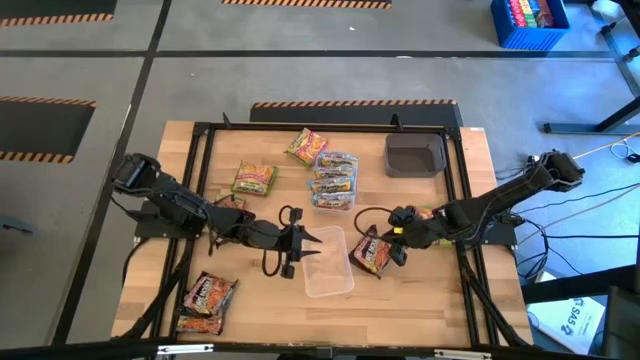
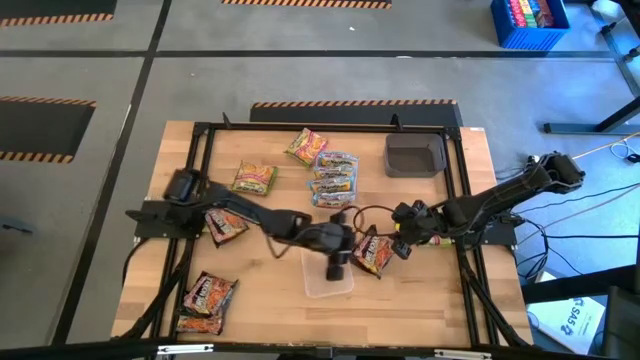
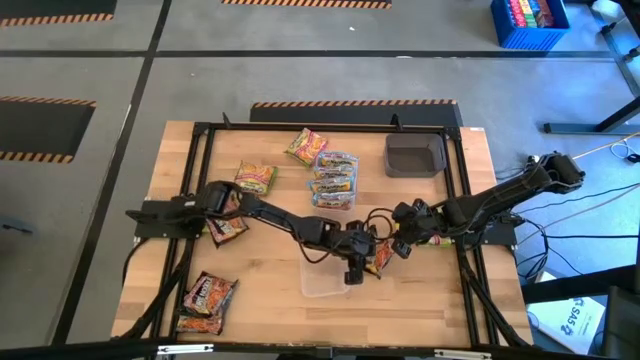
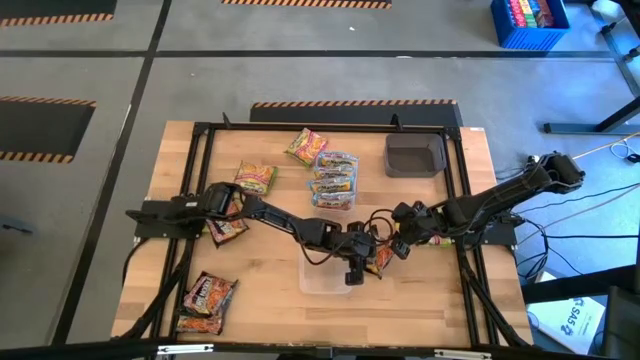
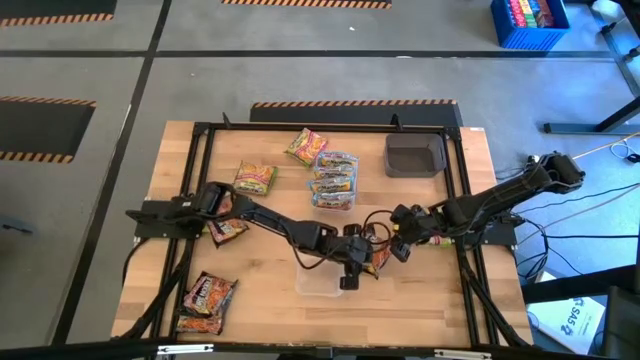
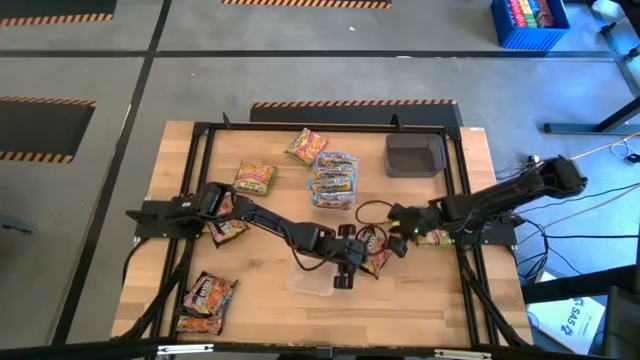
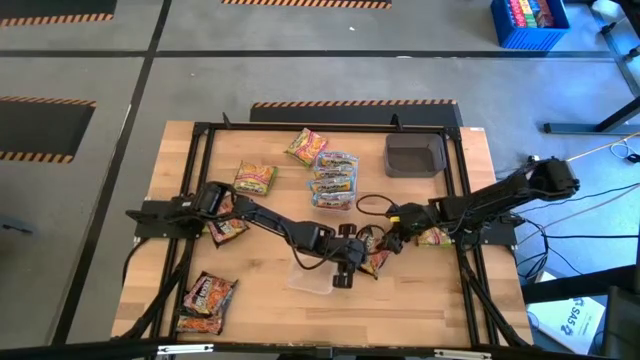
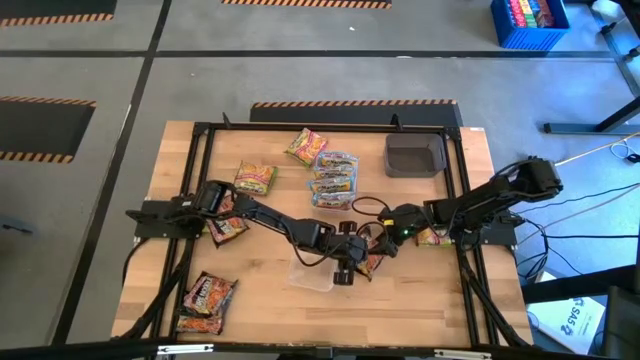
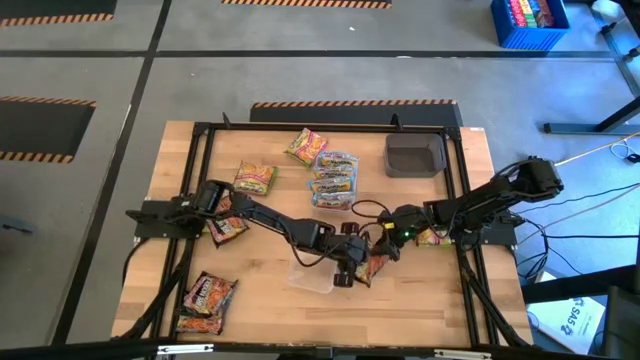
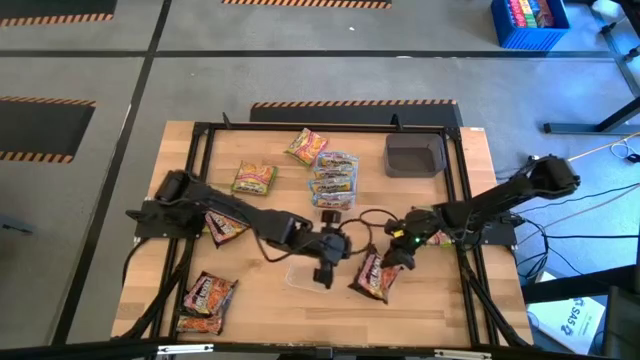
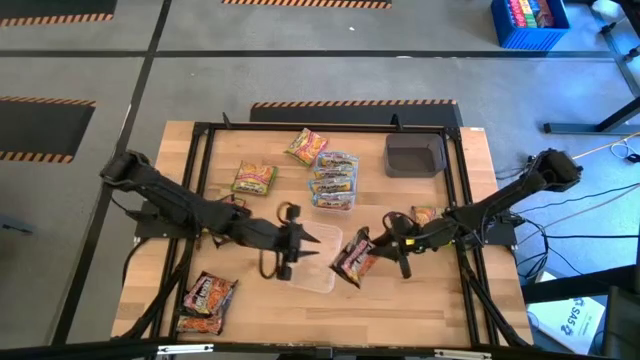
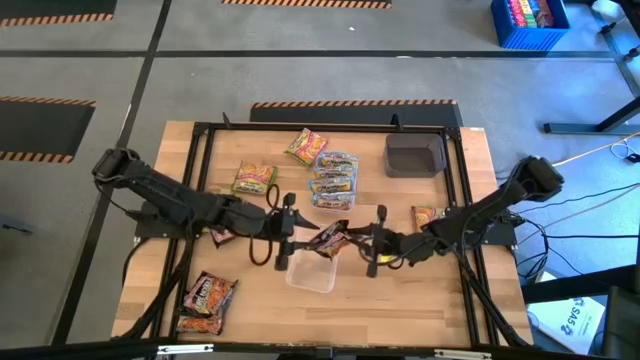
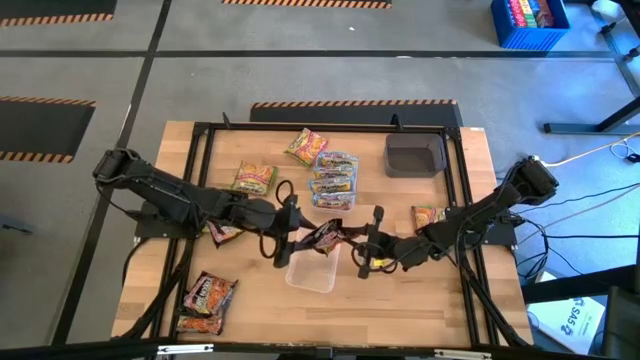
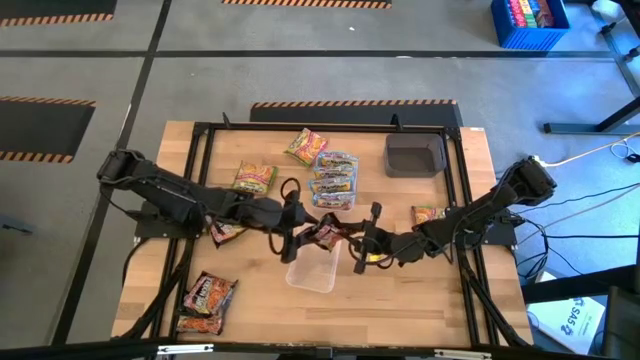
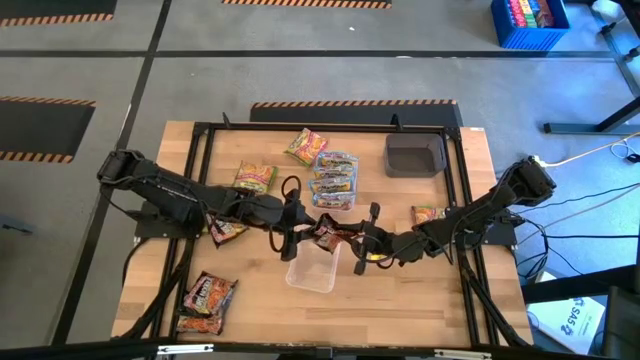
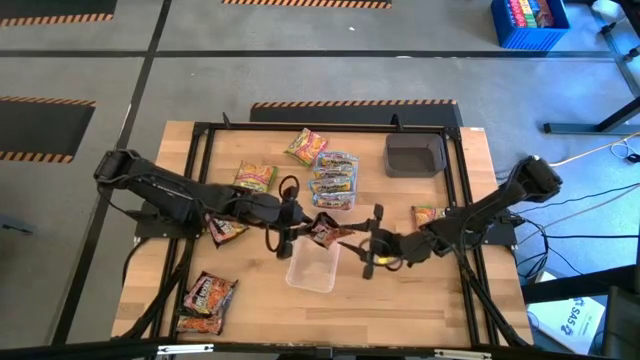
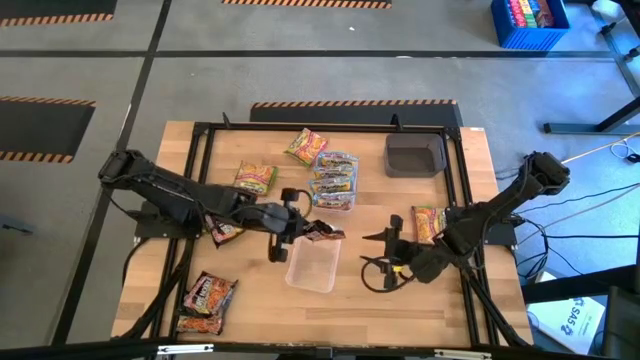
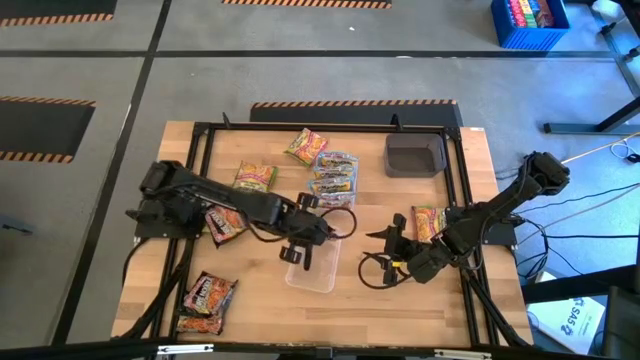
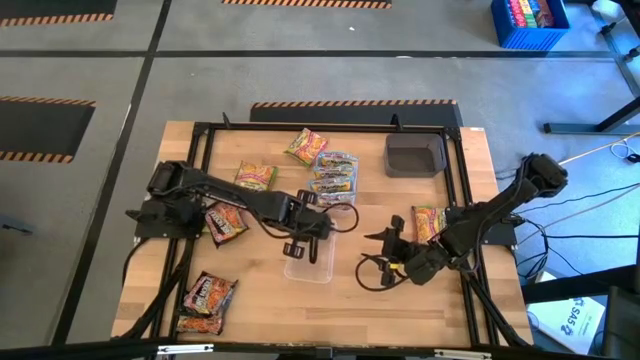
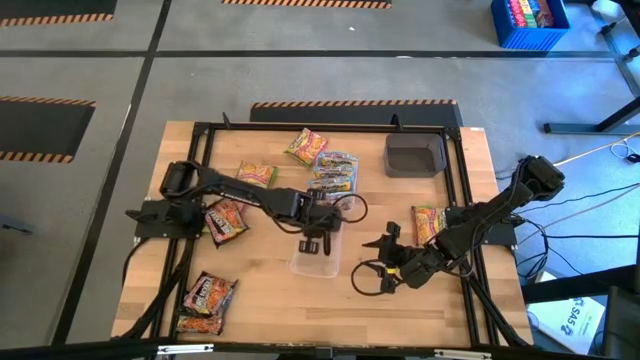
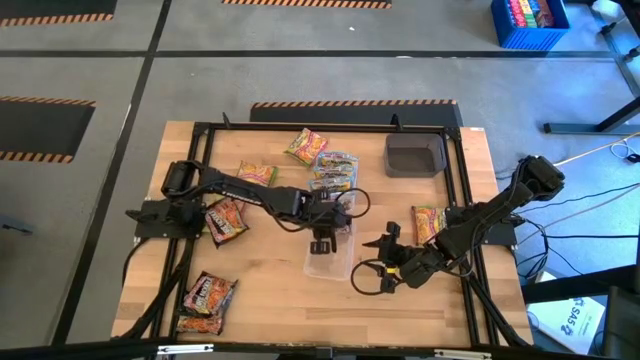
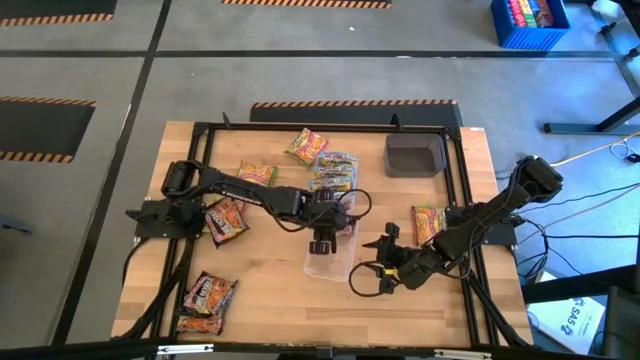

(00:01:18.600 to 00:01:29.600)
Task: Sort Maruchan noodles
Put the black noodle pack into the bottom transparent bin

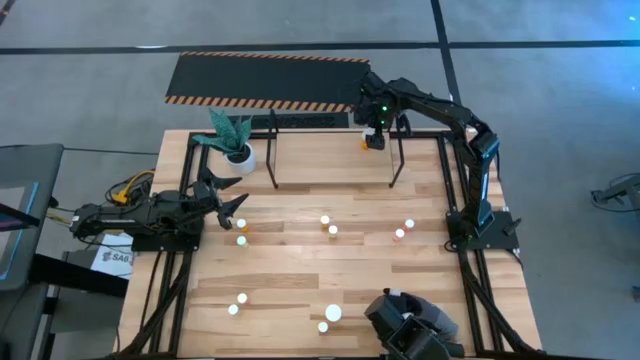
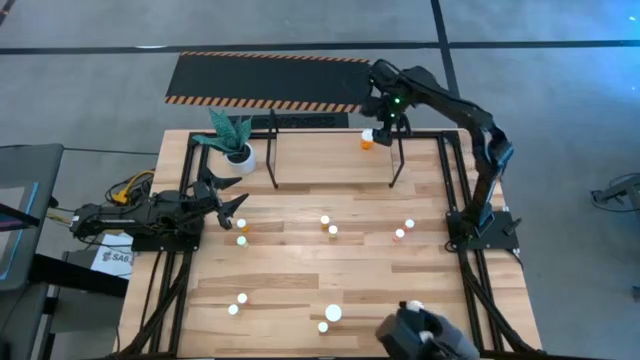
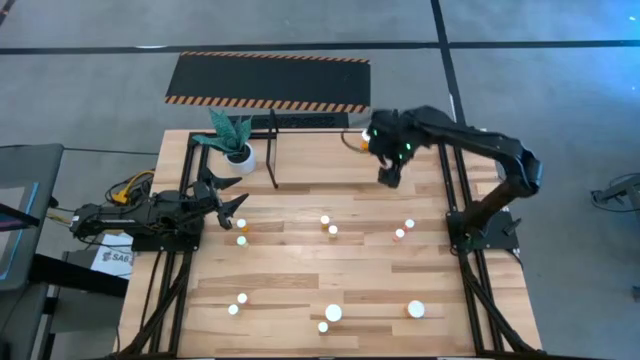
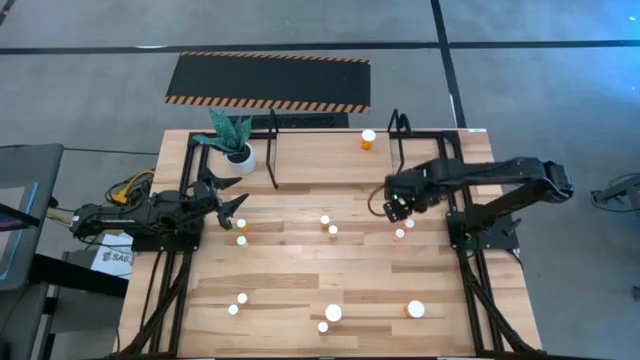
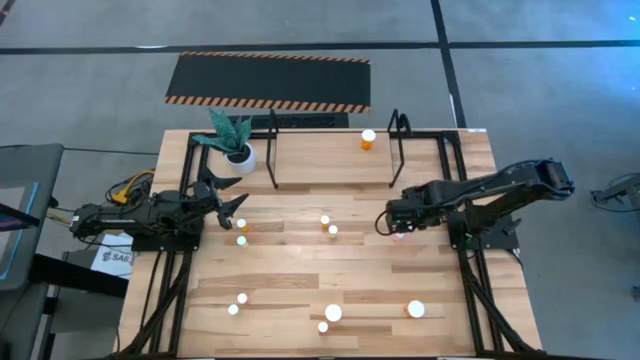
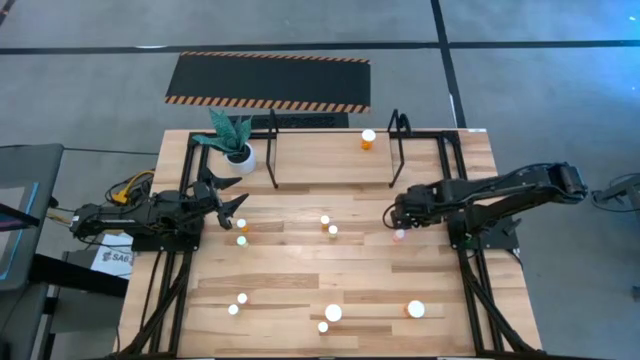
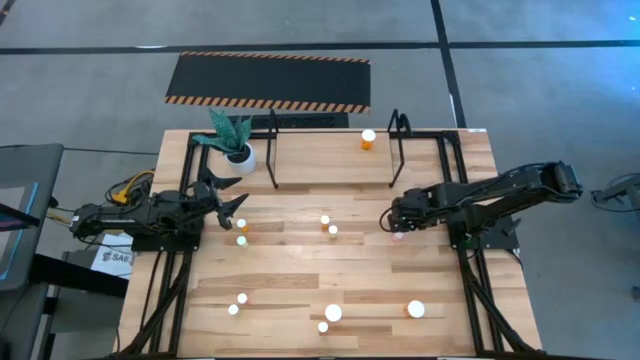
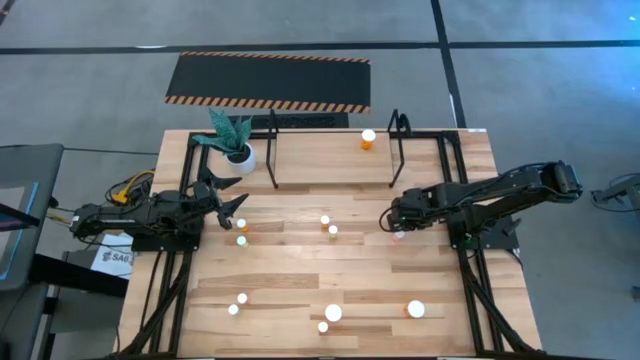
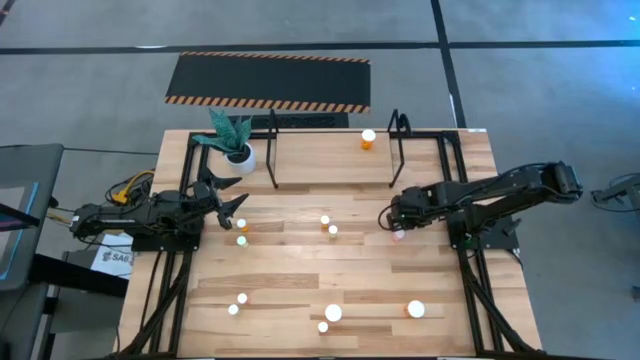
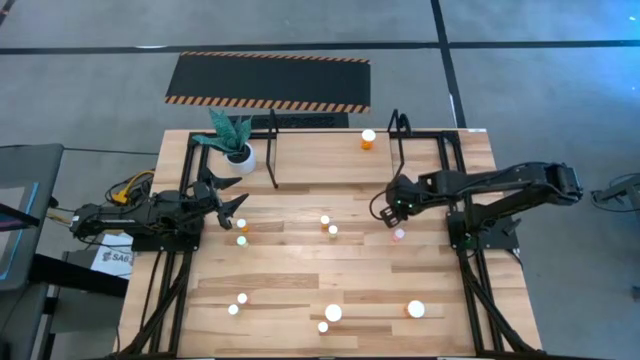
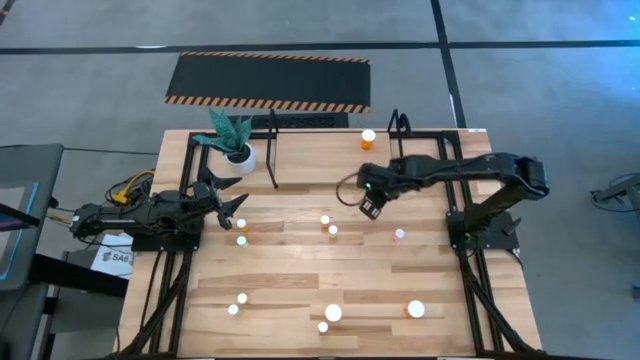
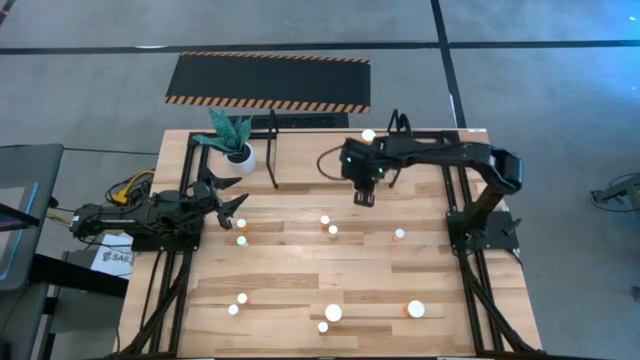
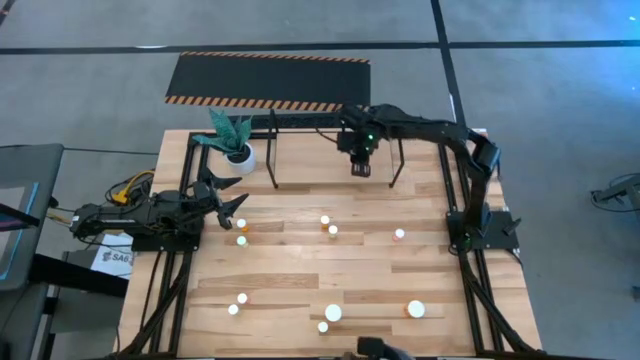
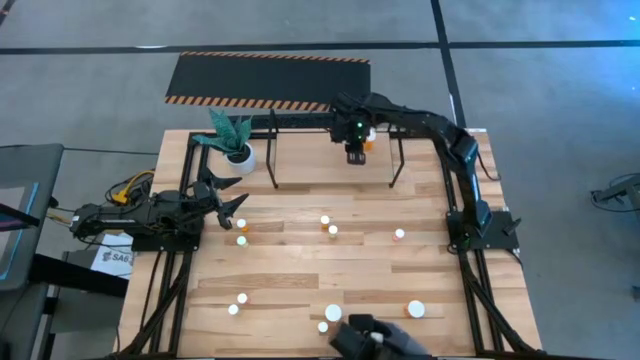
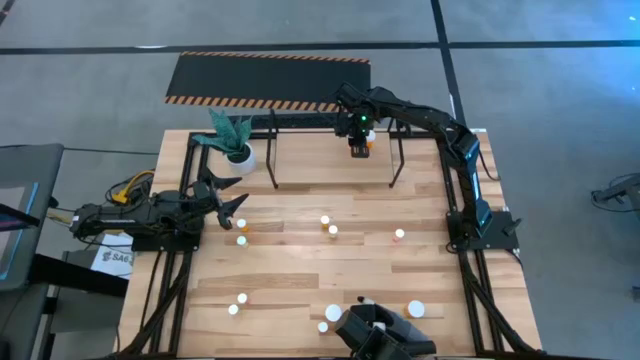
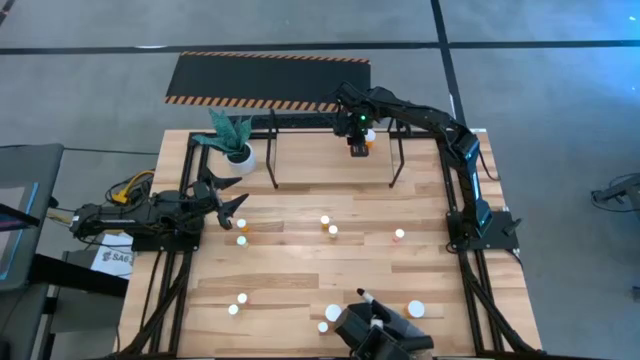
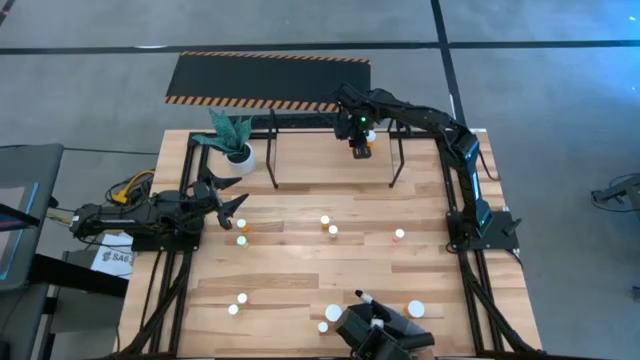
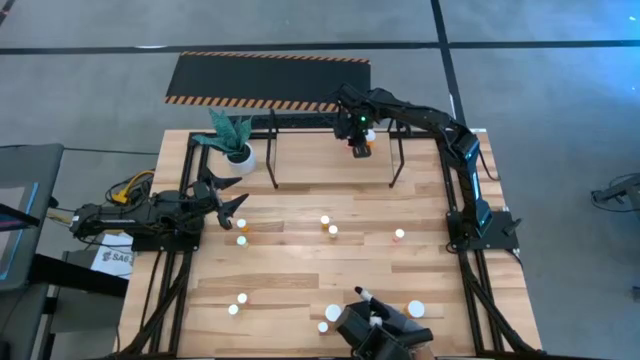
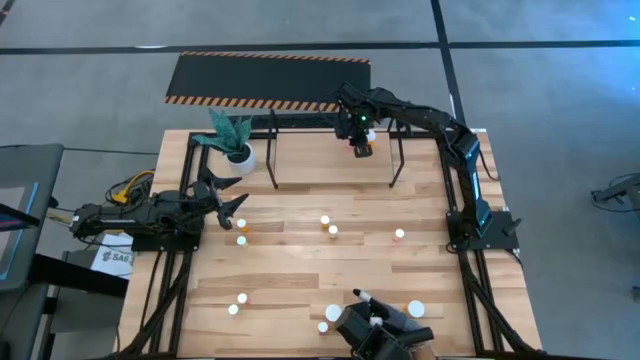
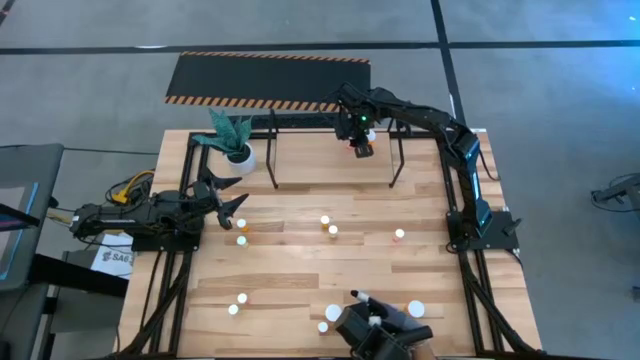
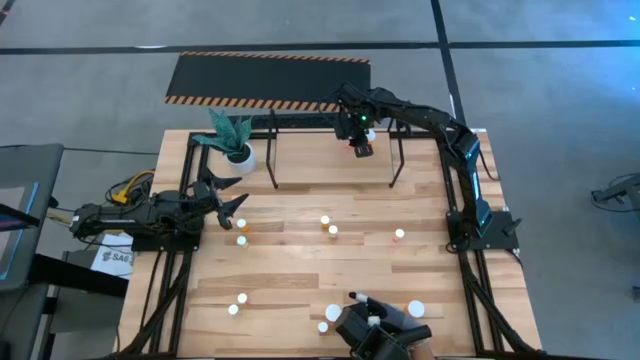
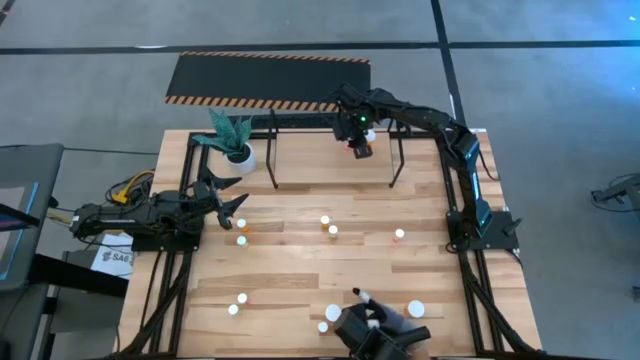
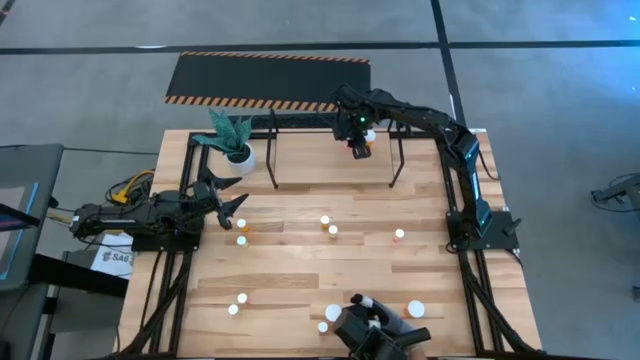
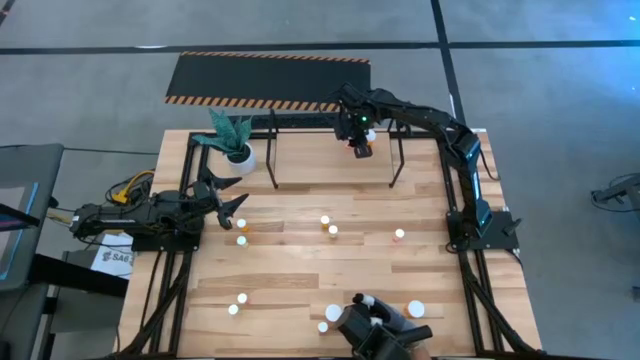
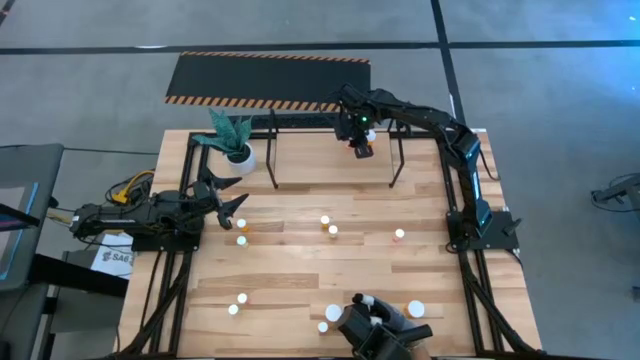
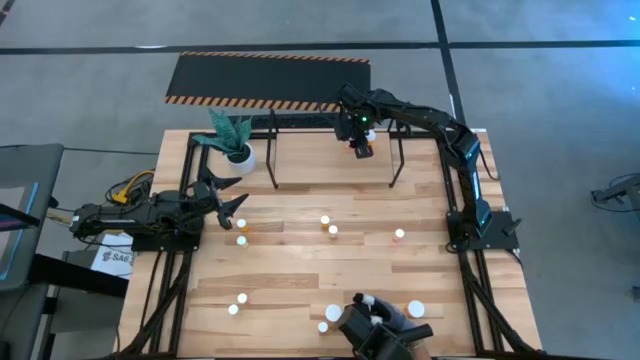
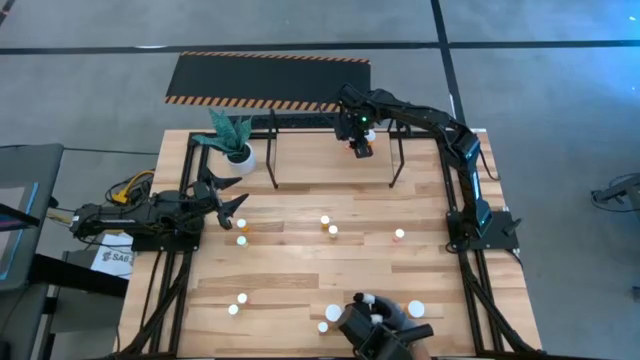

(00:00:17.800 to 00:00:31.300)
Task: Pick and place medicine bottles onto shelf by color
Put the top right small pink pill bottle on the shelf
